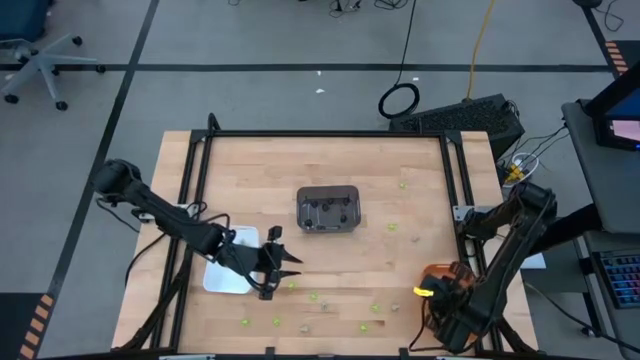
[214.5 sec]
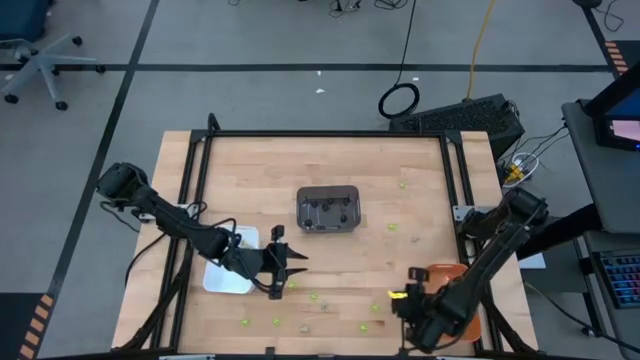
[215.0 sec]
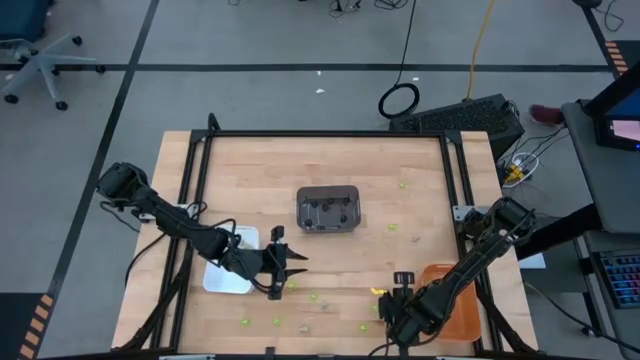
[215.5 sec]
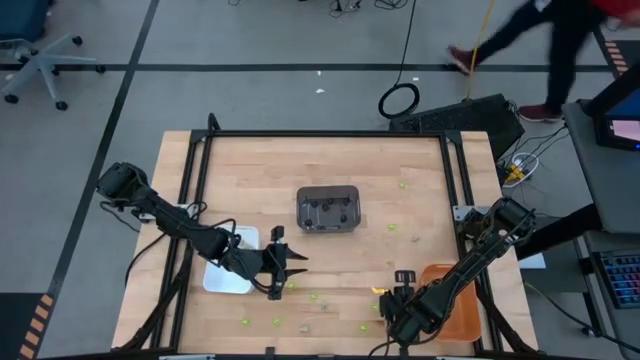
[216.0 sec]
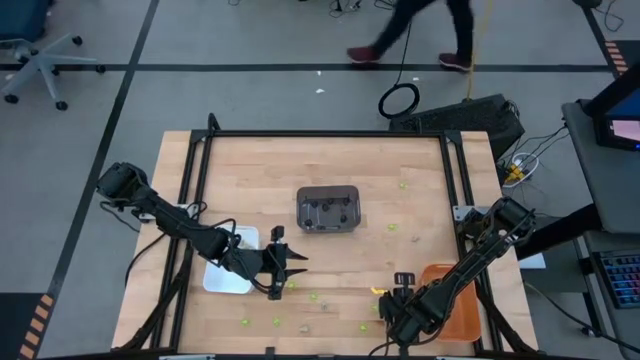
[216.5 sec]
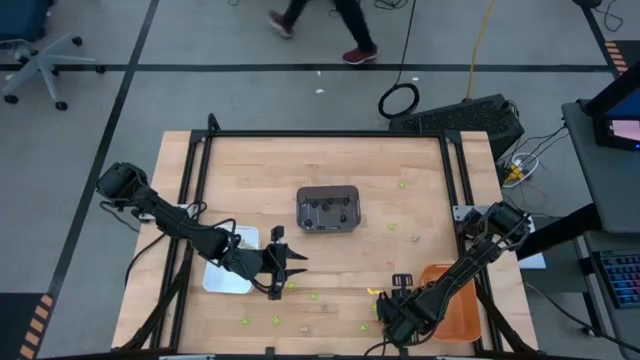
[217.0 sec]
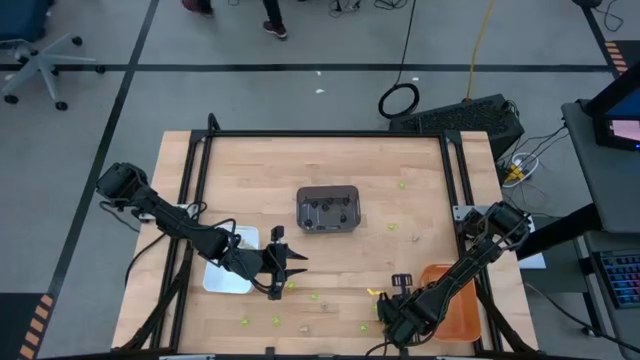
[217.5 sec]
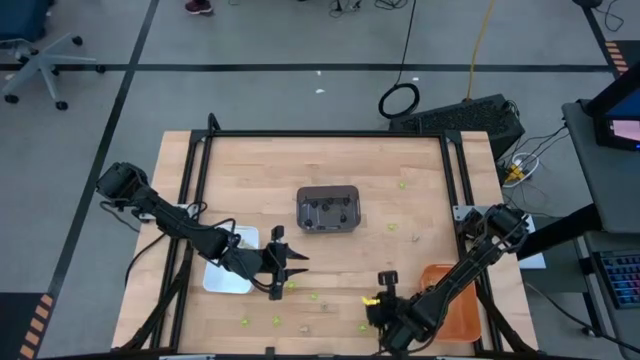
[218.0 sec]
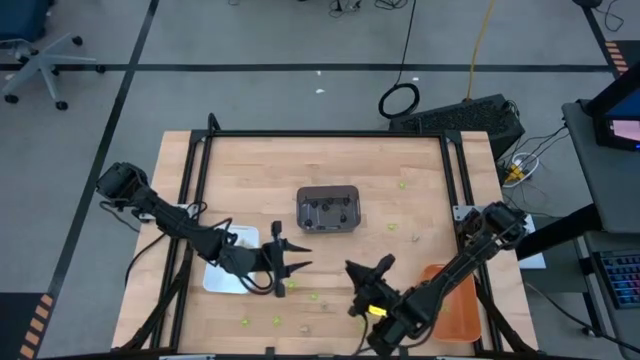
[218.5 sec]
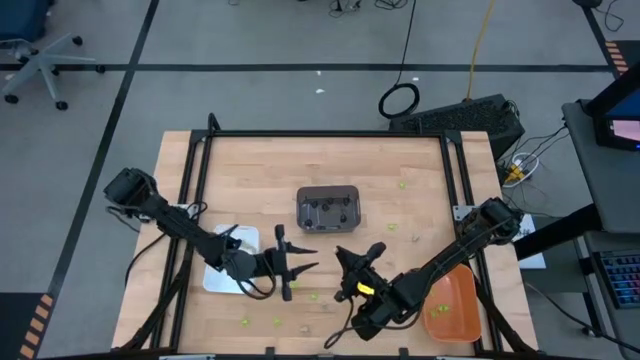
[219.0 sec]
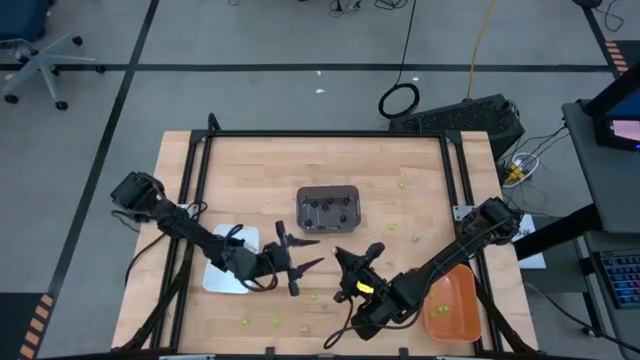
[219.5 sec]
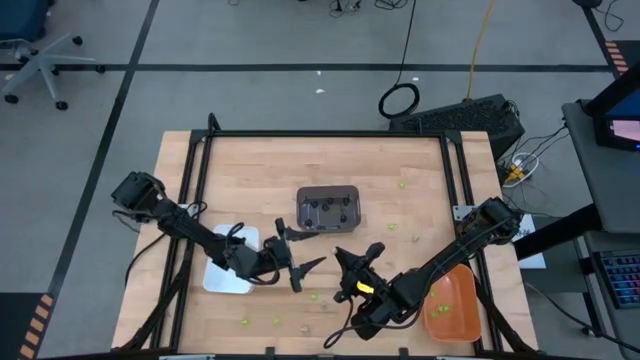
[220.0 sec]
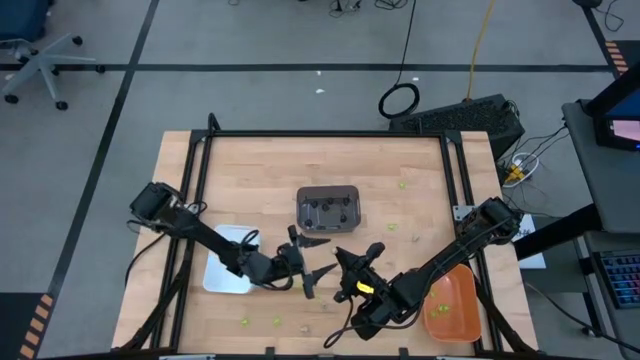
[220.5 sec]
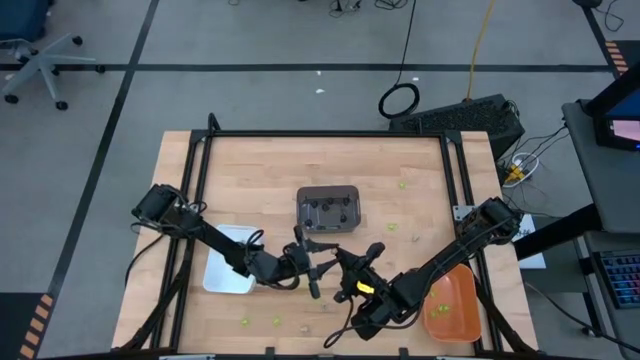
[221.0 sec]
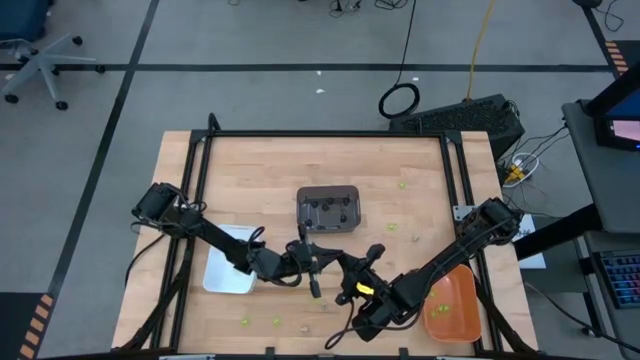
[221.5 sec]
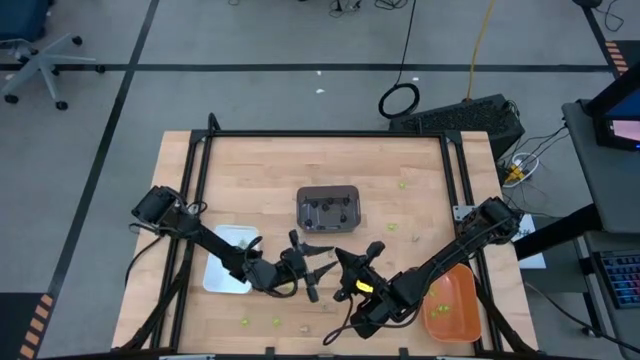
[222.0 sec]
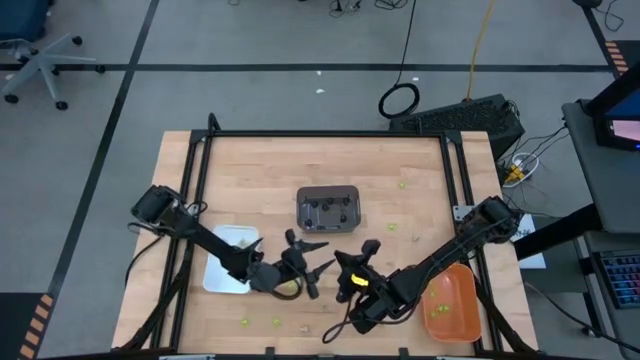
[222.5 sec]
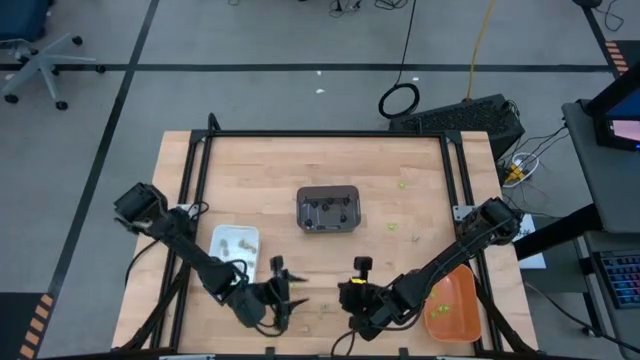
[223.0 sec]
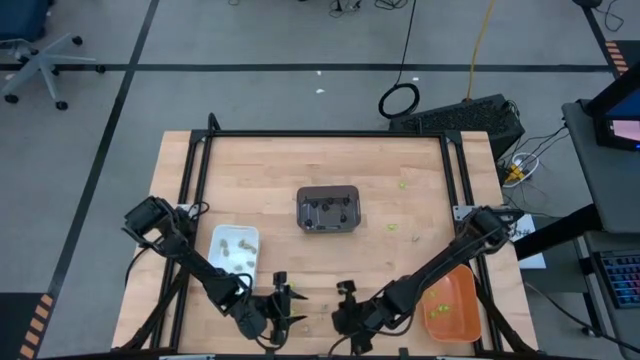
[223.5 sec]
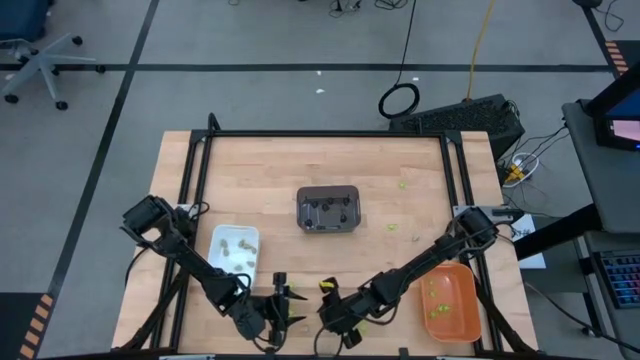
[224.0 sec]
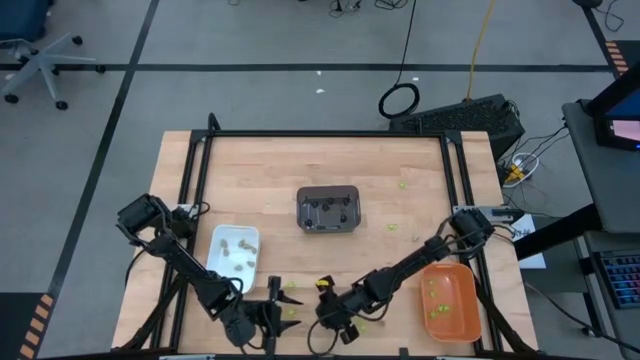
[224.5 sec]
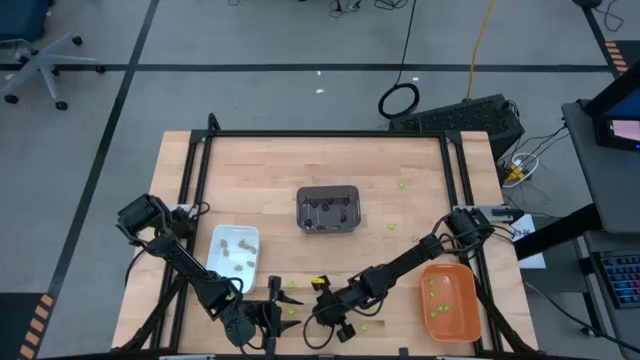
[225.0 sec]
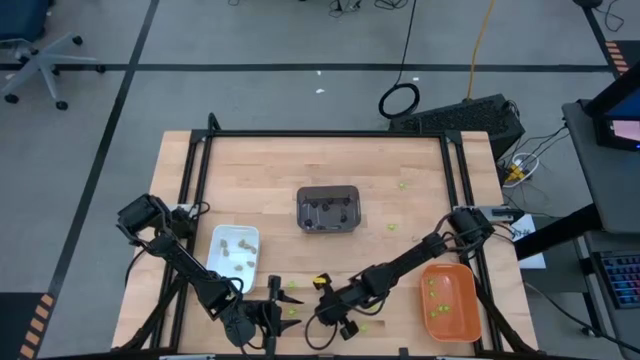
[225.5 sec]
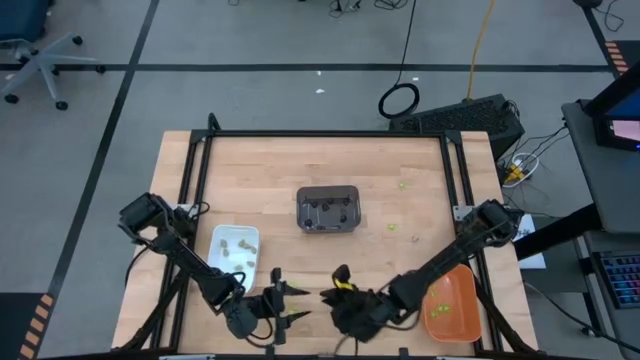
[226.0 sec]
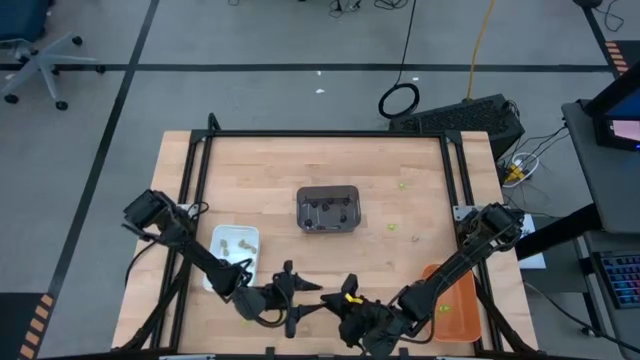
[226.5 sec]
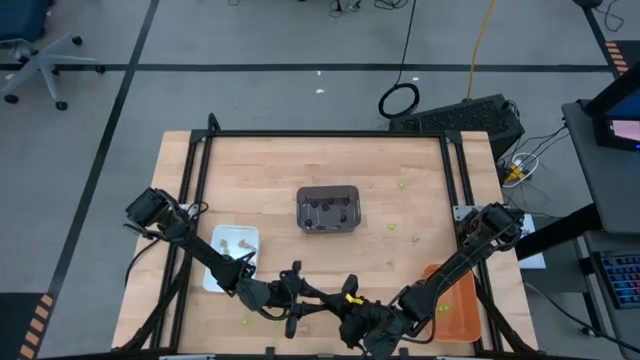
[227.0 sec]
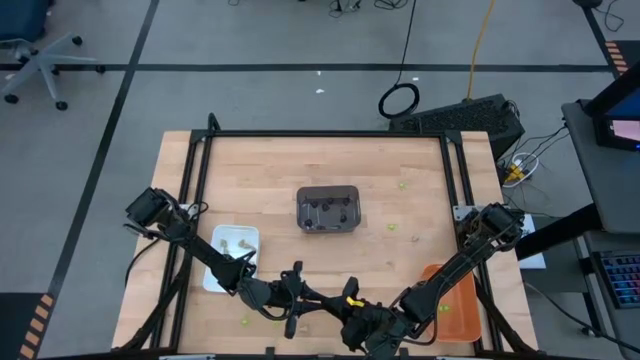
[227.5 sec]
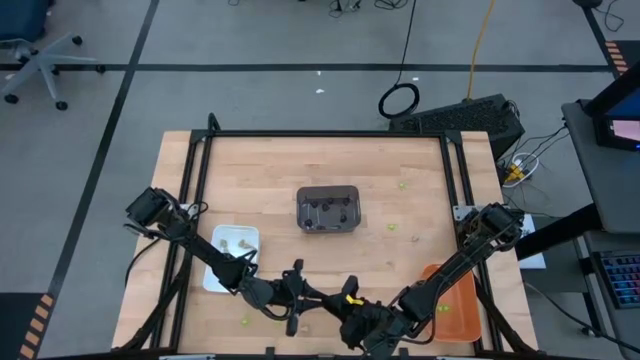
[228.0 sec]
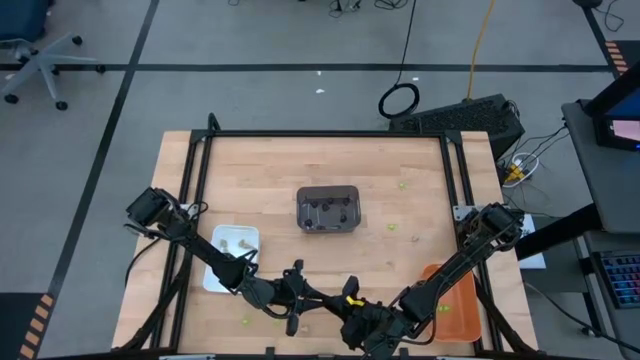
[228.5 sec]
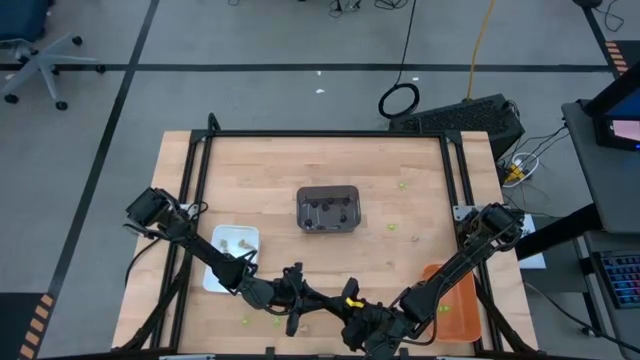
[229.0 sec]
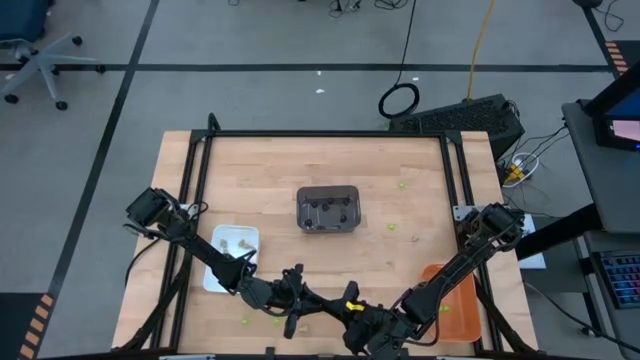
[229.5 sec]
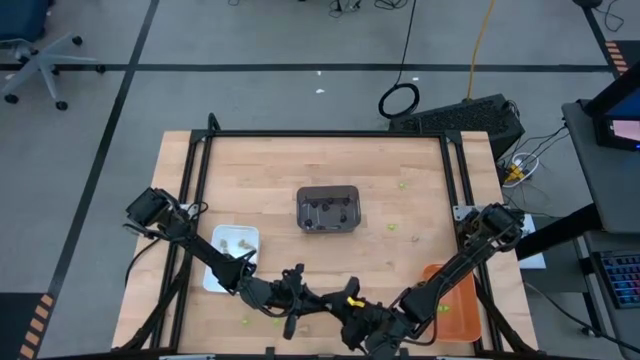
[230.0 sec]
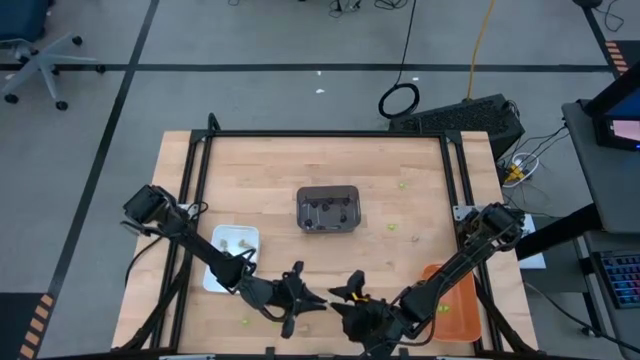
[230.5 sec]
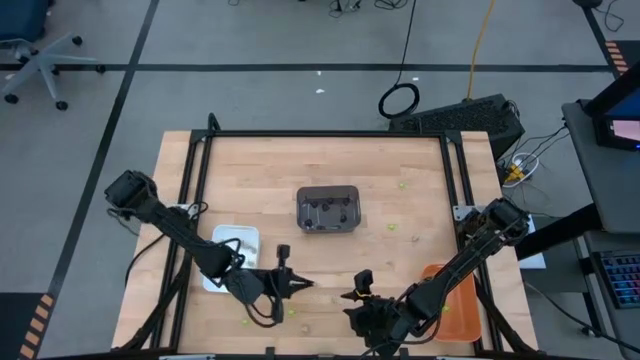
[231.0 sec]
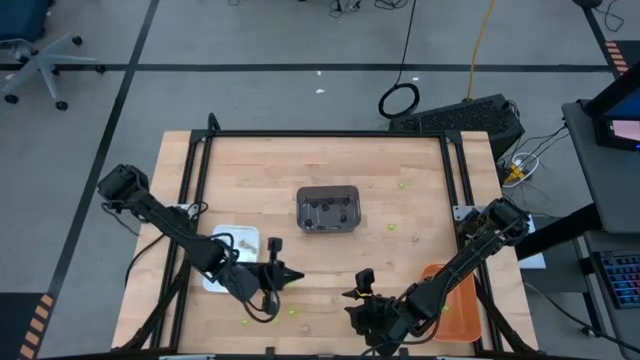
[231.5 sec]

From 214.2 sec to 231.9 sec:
Task: Sort Halloween decoration
Put the white skull toy into the white bin

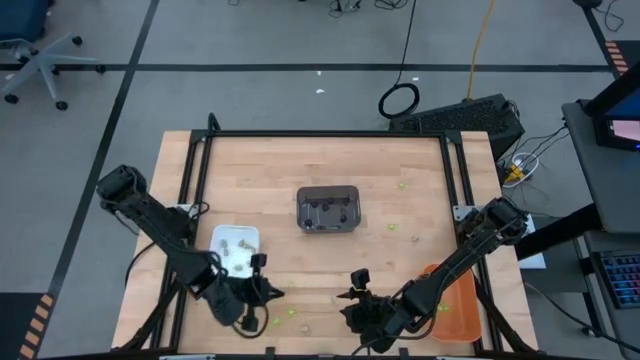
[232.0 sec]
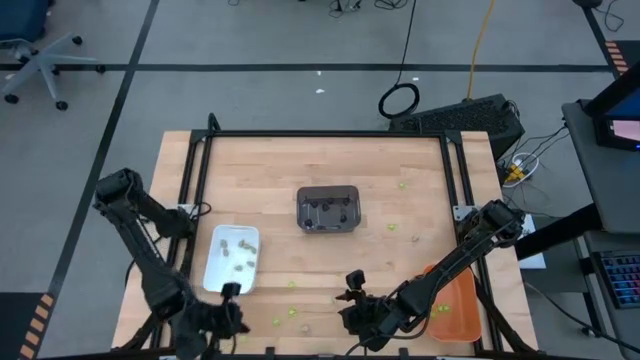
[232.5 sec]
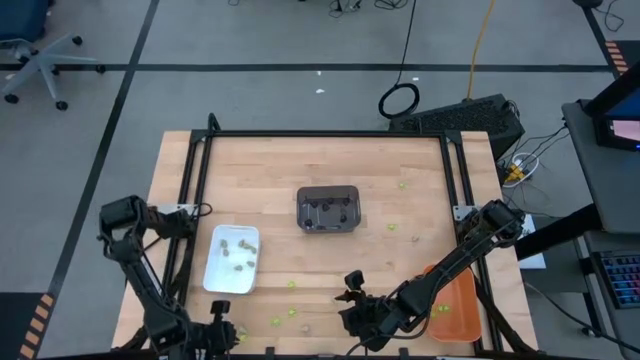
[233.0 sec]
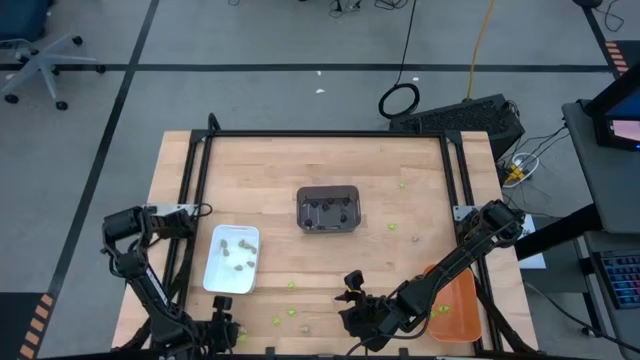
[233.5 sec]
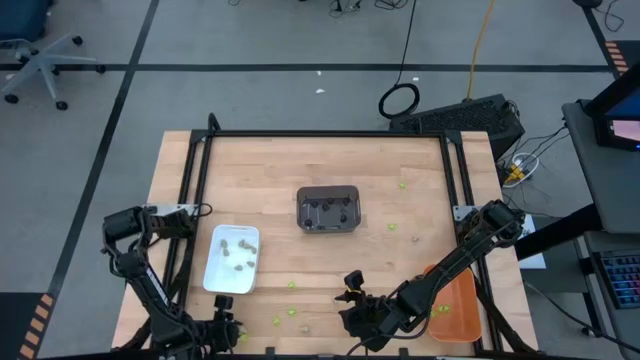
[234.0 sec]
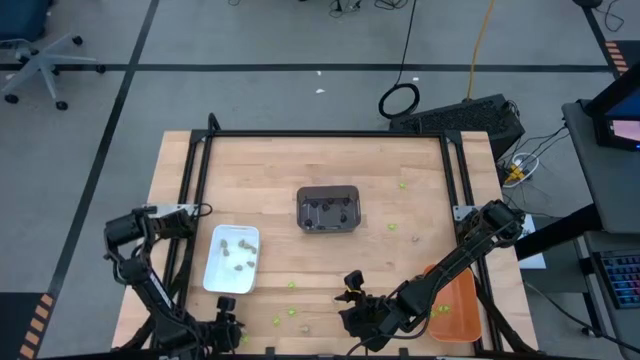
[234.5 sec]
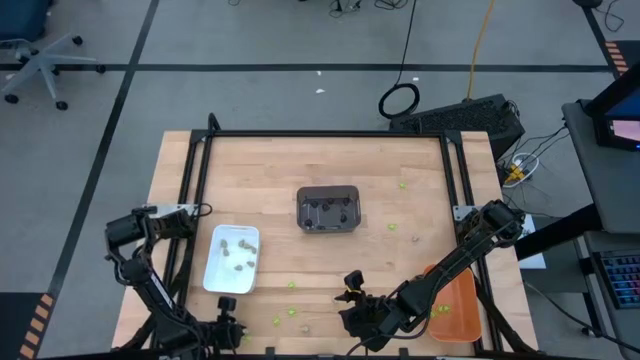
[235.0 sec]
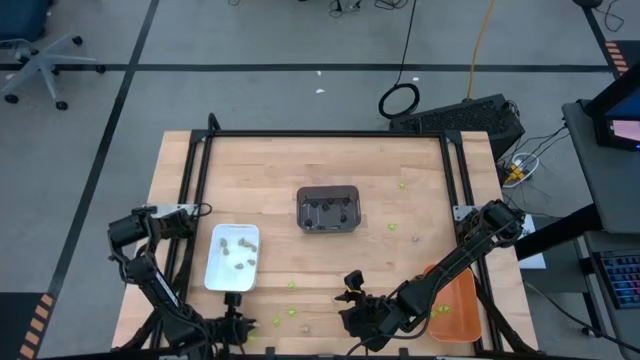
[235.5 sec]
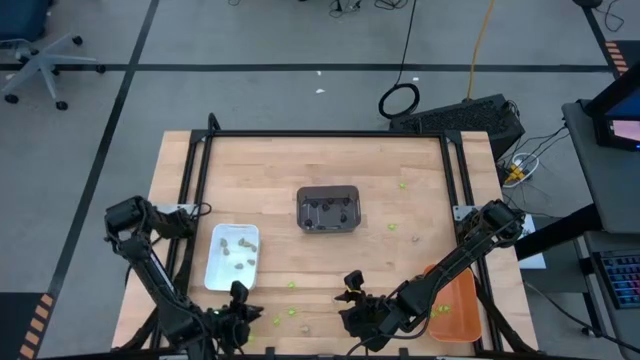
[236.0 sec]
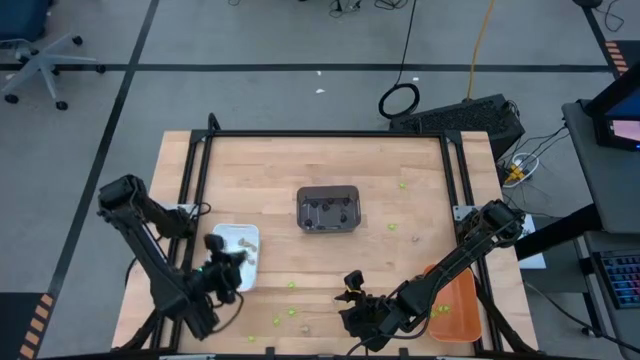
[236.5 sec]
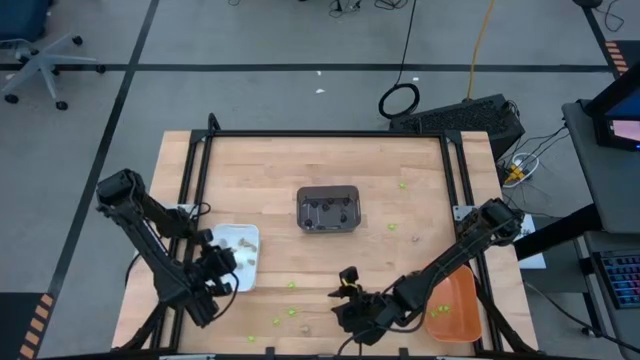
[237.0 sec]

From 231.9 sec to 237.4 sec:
Put the white skull toy into the white bin
